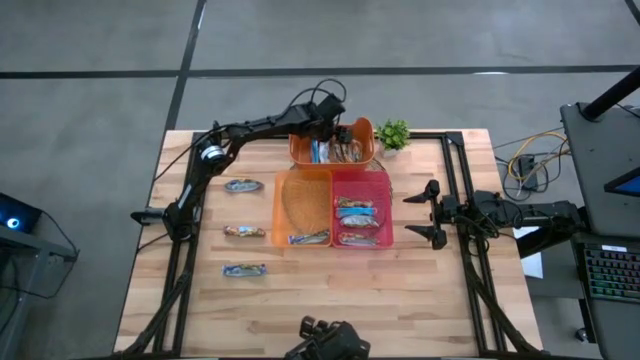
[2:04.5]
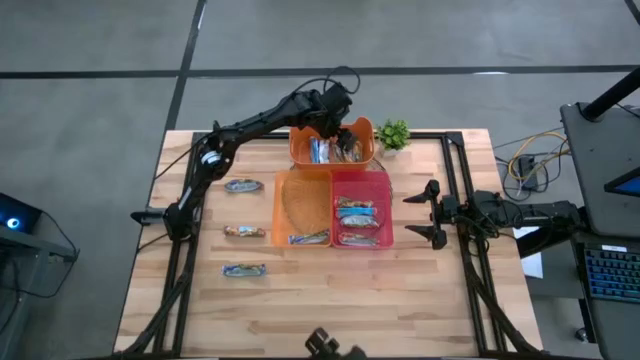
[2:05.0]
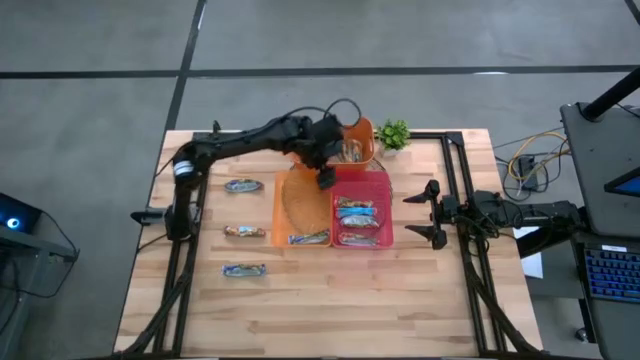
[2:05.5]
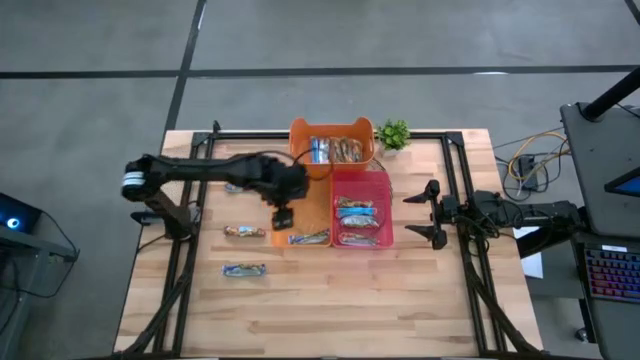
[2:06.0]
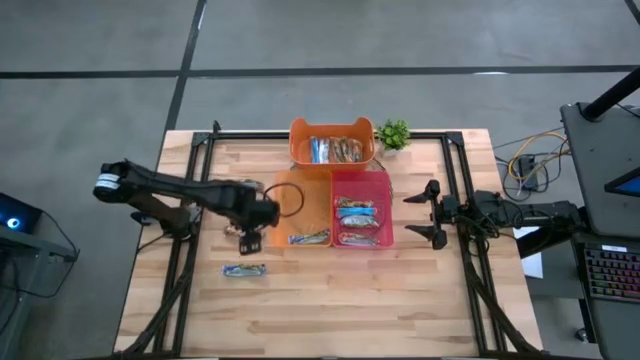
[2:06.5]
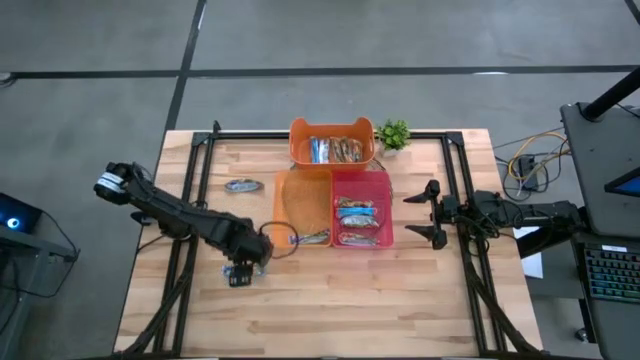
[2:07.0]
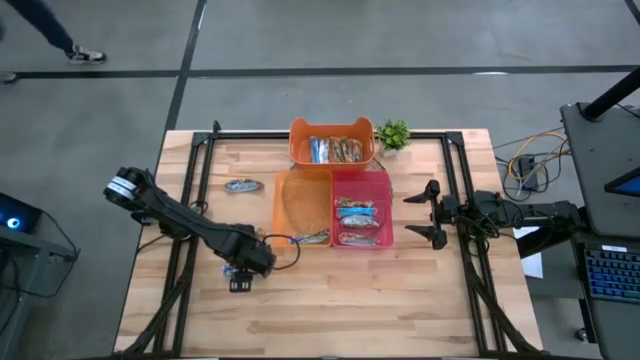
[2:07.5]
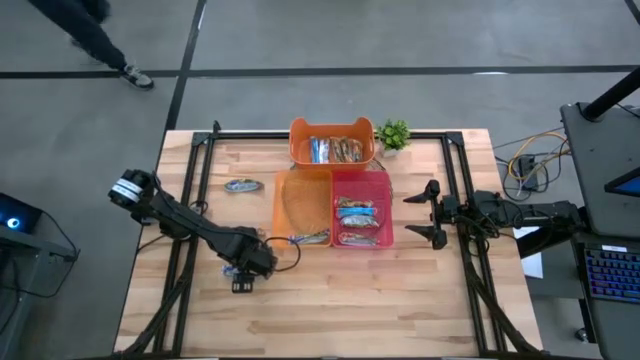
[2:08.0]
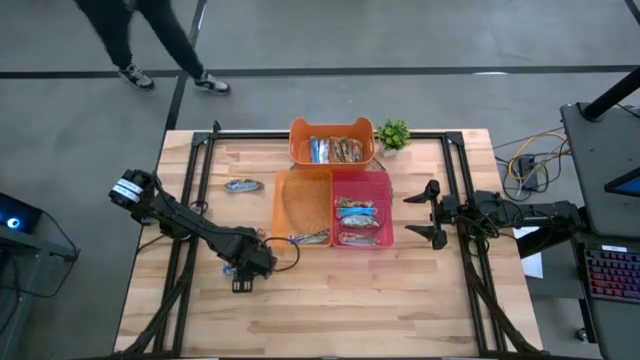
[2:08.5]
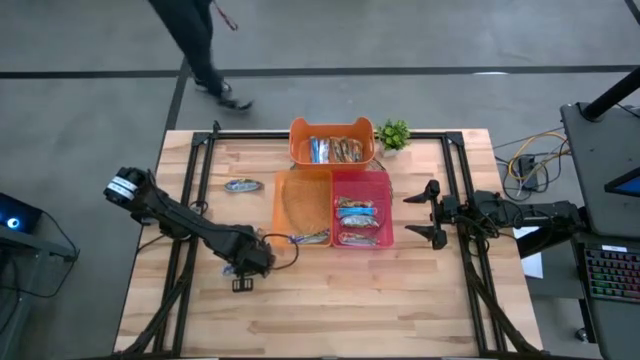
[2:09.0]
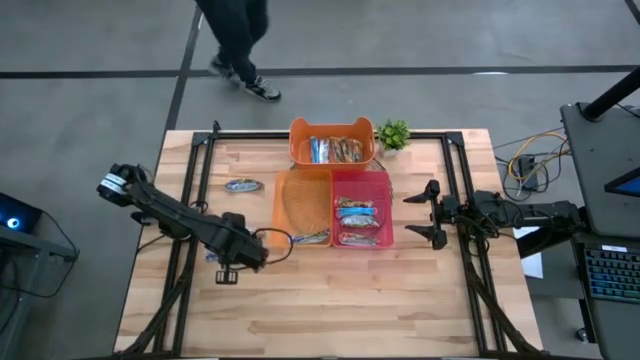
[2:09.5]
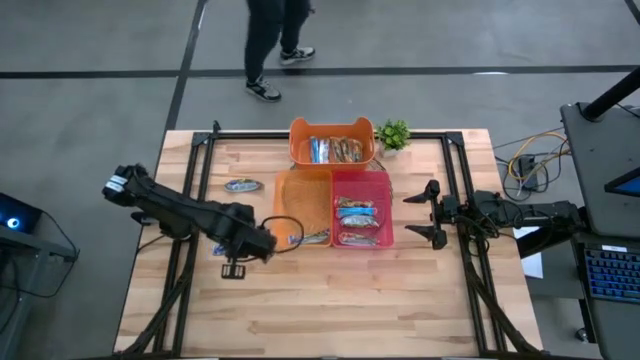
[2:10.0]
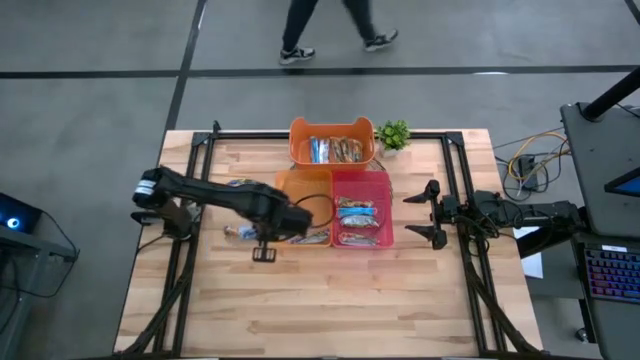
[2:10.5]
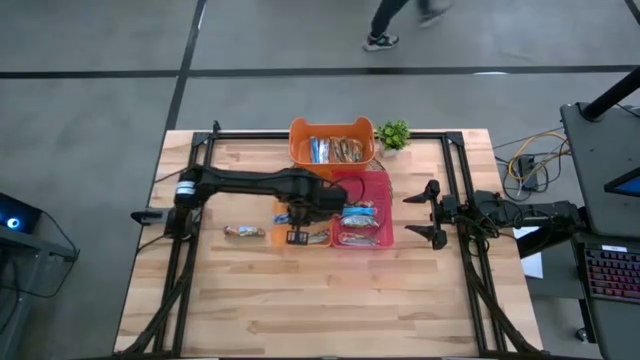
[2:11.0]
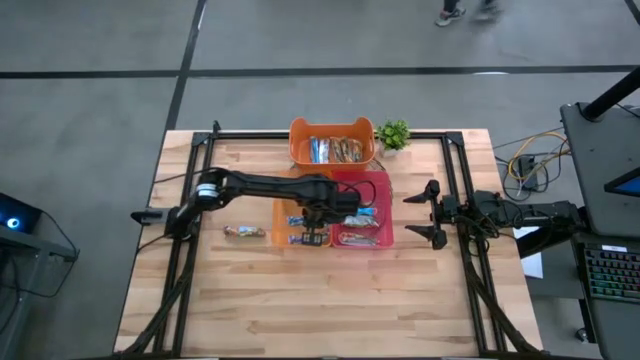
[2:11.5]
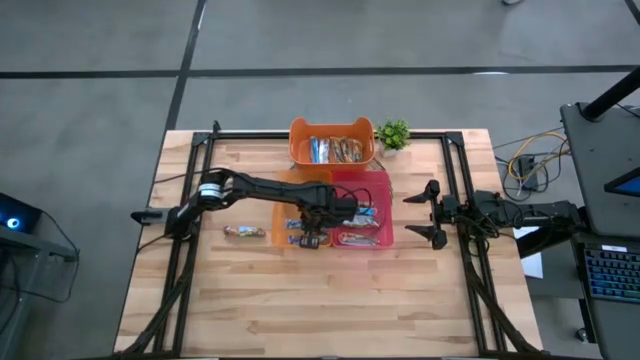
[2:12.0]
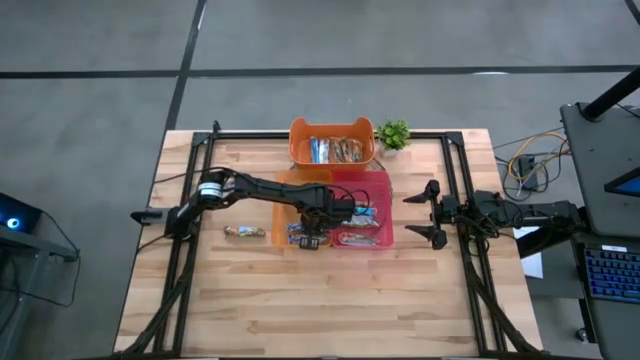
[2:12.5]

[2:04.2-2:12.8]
Task: Pick and place Granola Bars by type
Put the blue granola bar into the light orange bin

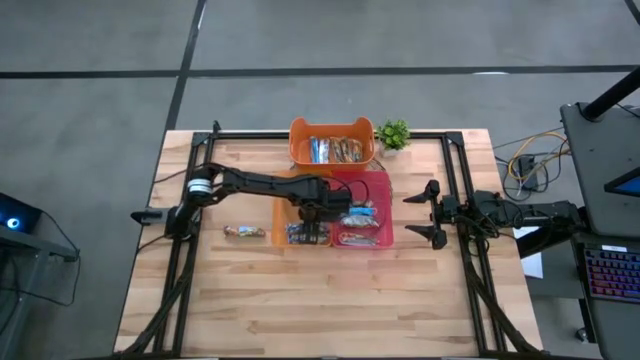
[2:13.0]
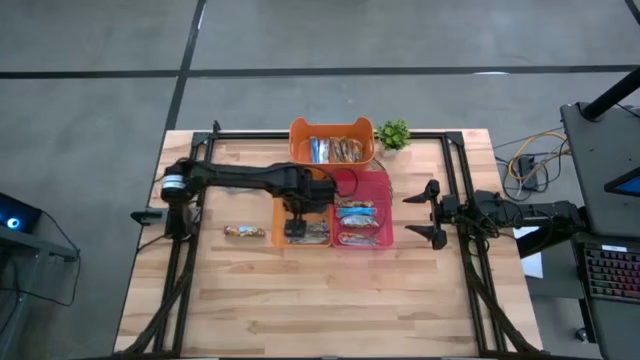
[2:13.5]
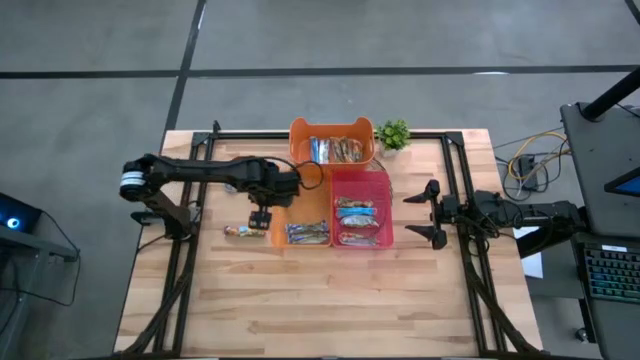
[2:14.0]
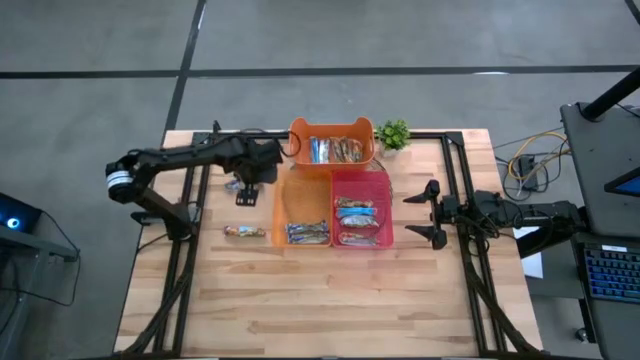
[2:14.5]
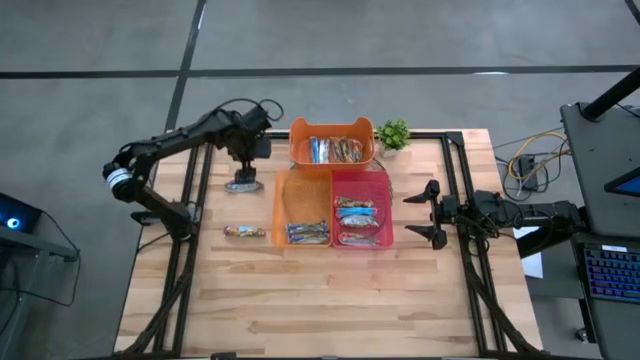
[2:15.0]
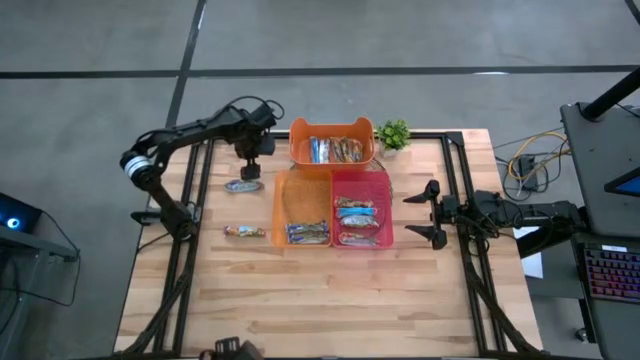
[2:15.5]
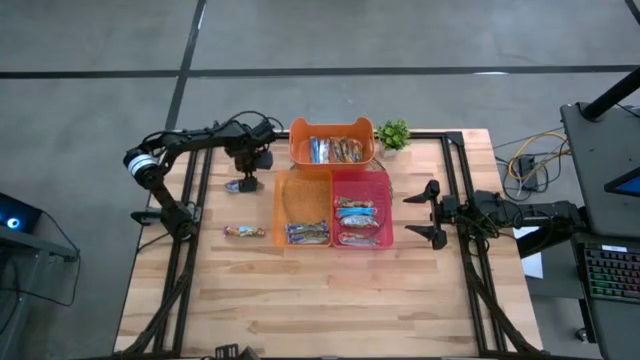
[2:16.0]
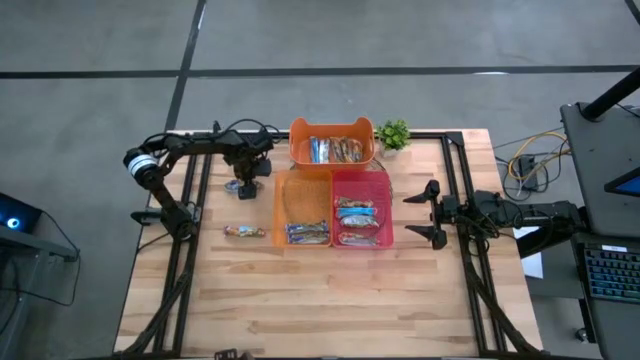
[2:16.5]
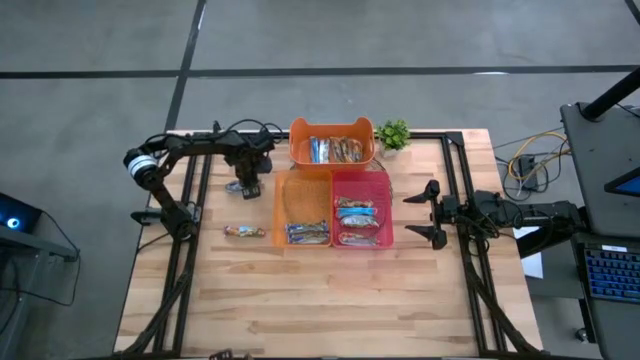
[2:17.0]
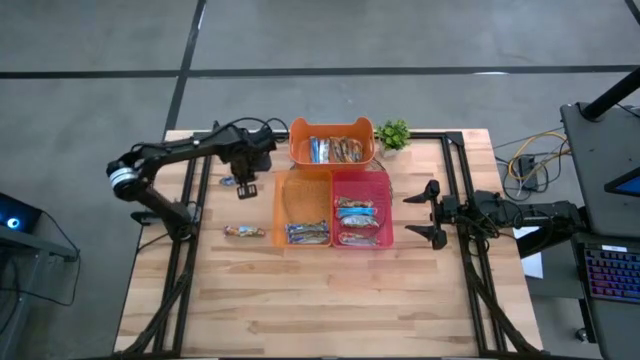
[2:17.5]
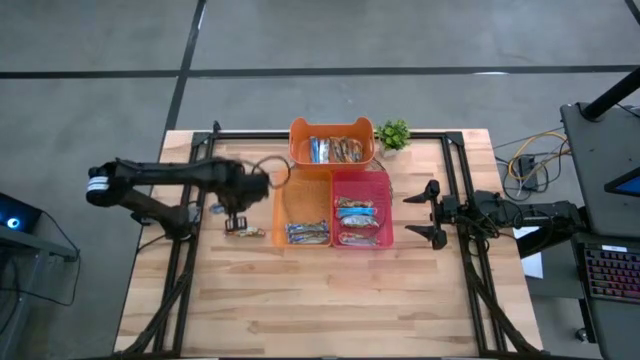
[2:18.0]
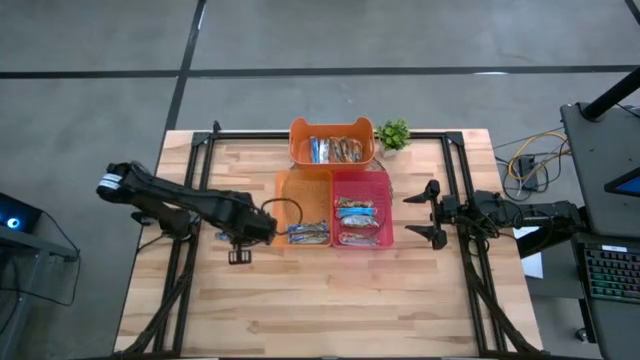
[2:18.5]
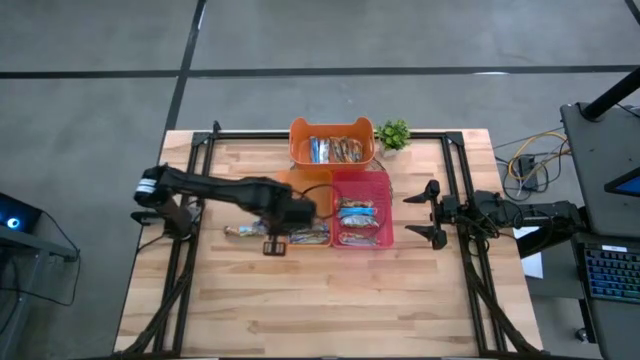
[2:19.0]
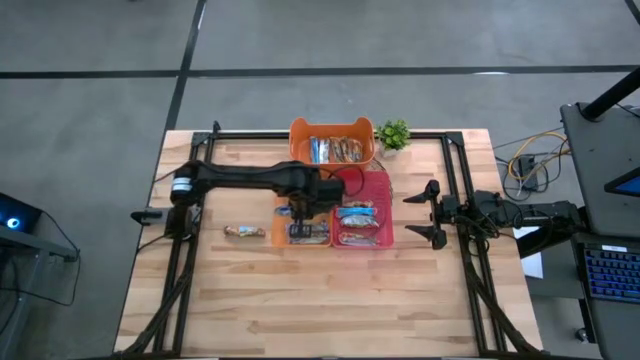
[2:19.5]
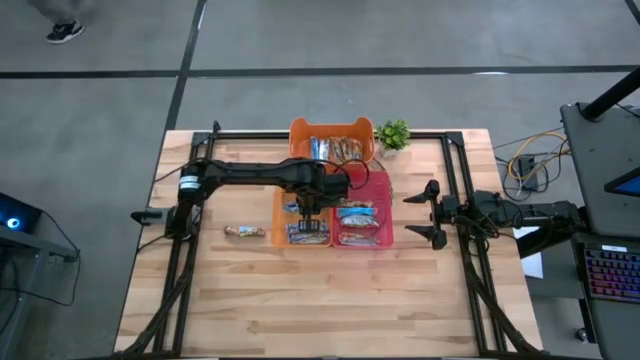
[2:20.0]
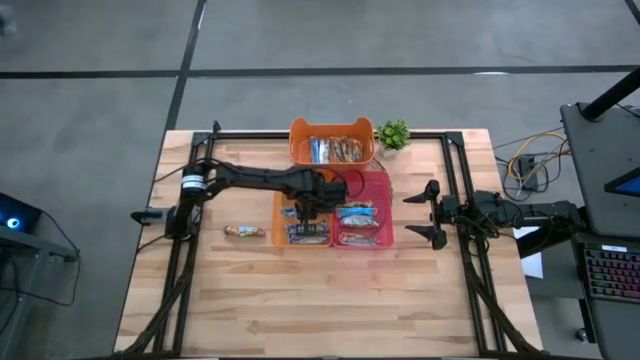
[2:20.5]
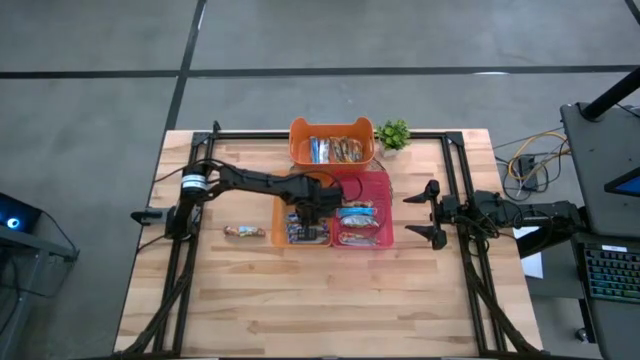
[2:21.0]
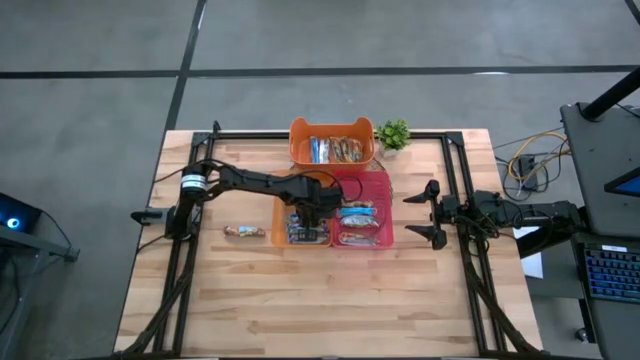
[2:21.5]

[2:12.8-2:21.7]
Put the blue granola bar into the light orange bin

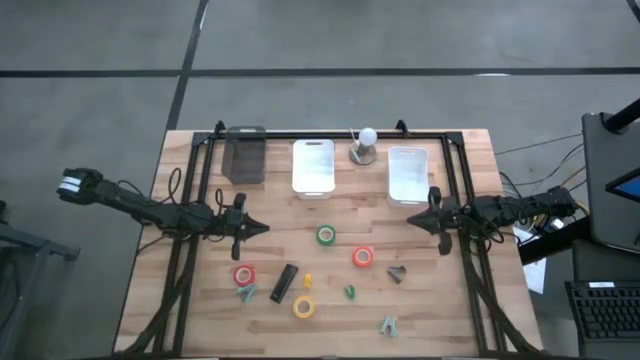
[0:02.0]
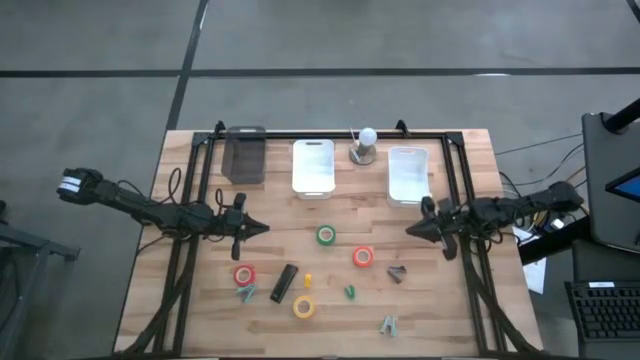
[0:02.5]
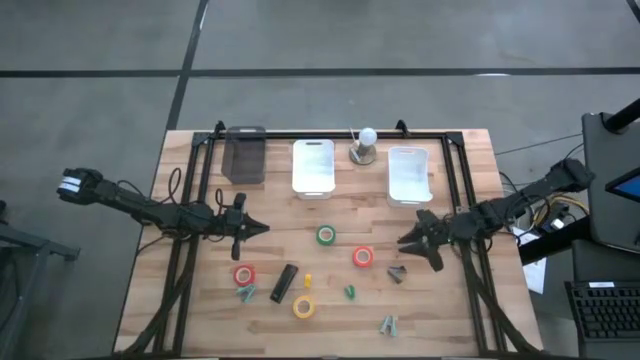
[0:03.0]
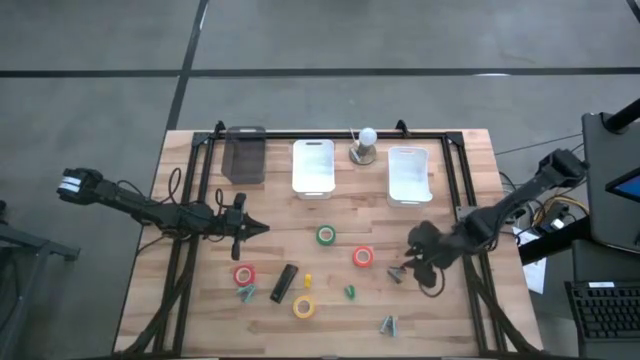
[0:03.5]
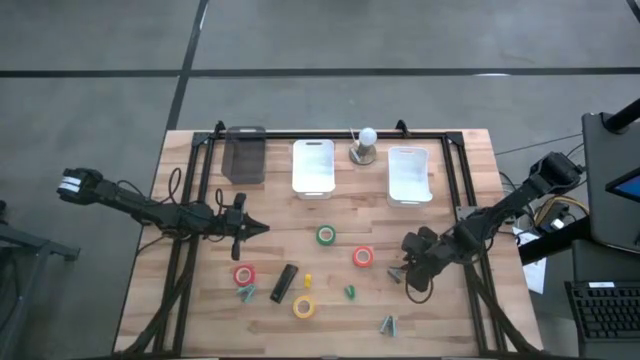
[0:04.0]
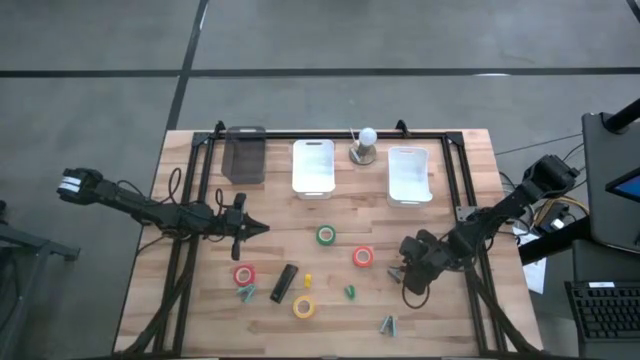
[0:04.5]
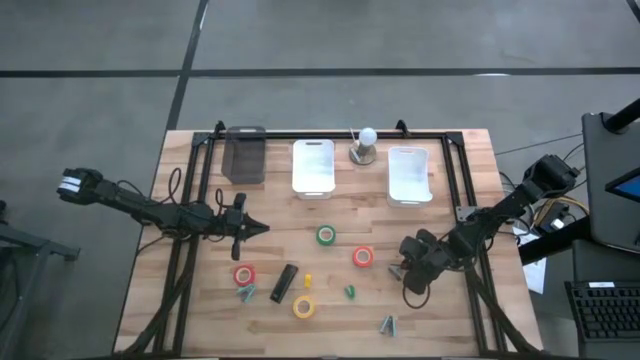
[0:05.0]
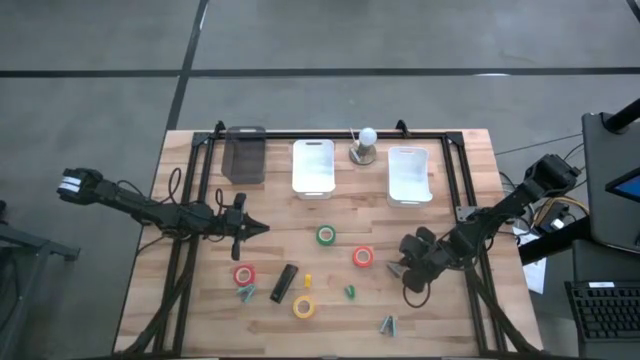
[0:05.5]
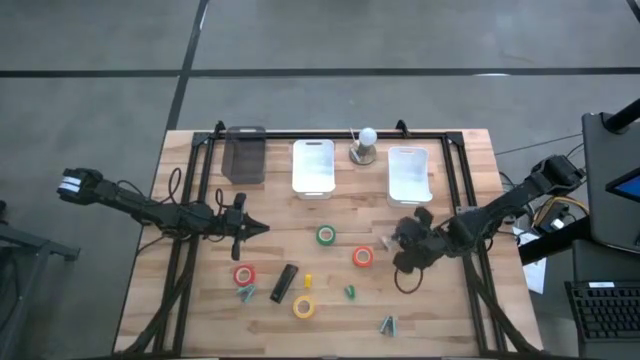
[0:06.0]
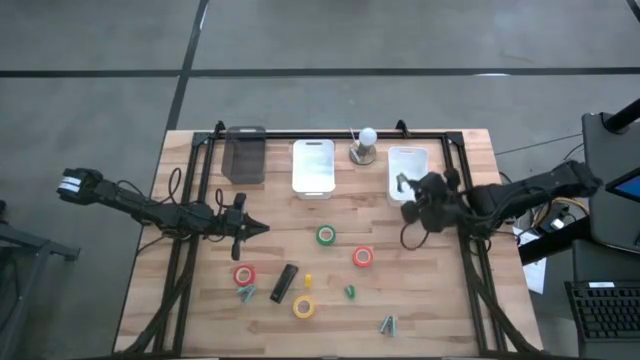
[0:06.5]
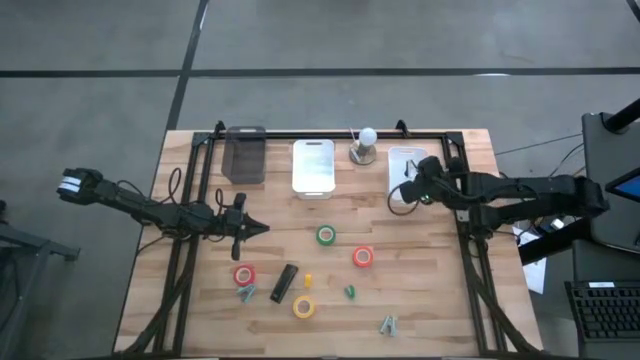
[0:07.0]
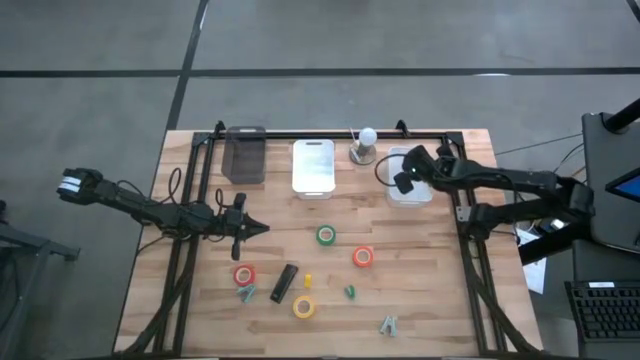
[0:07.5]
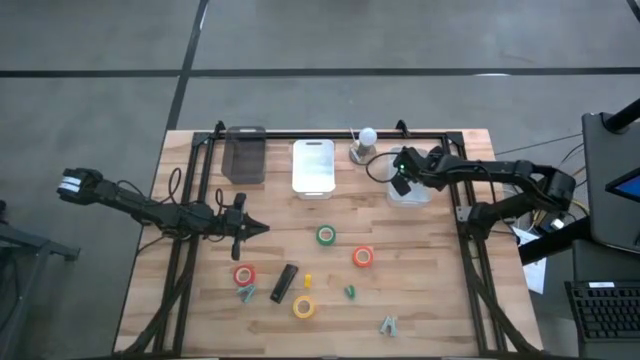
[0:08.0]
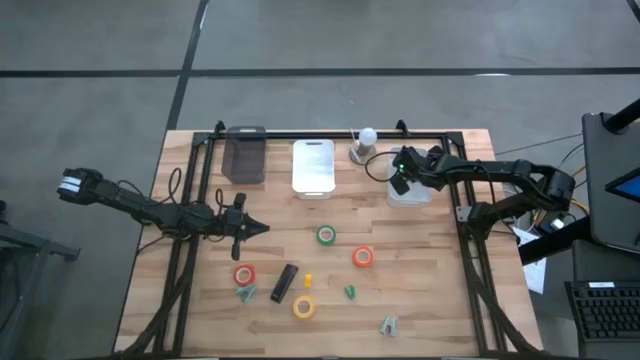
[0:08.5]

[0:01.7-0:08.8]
Task: Pick and place Stapler, Stapler remover, tape
Put the black staple remover into the right white bin
